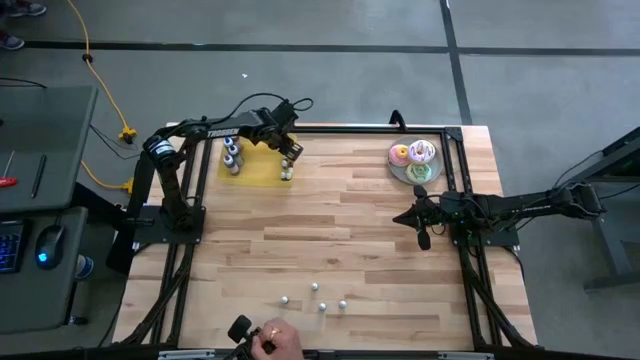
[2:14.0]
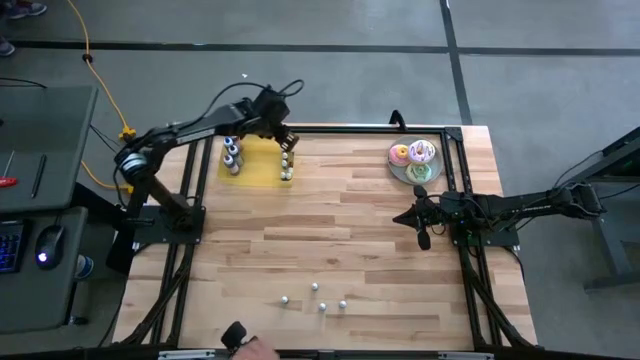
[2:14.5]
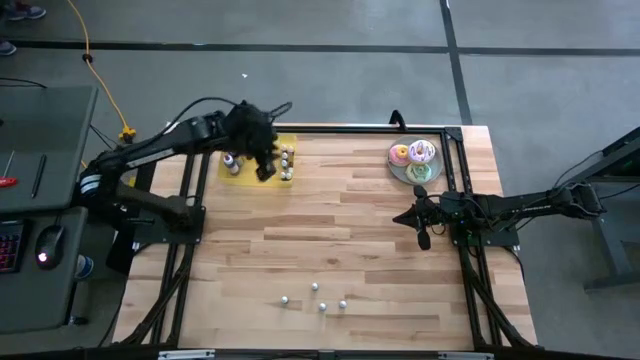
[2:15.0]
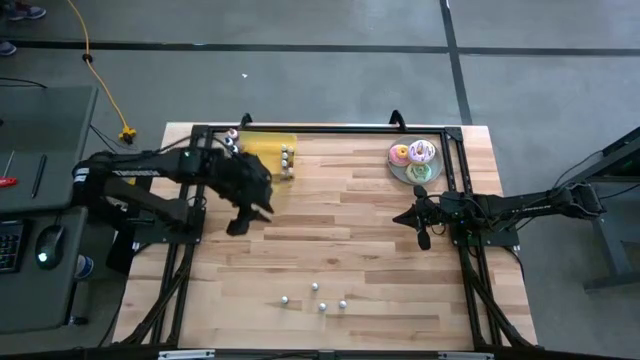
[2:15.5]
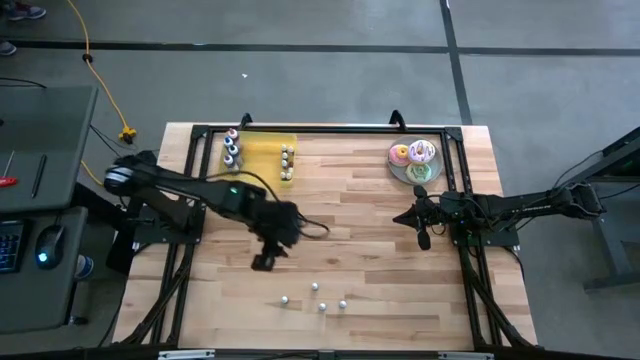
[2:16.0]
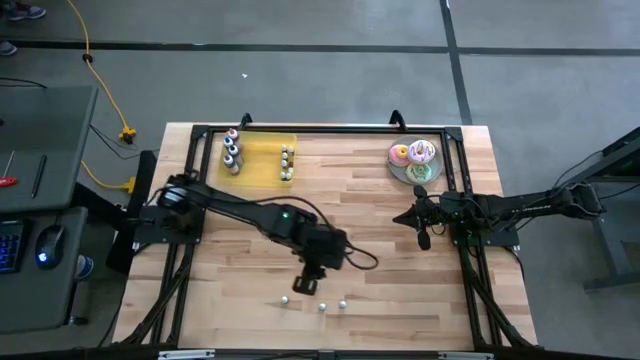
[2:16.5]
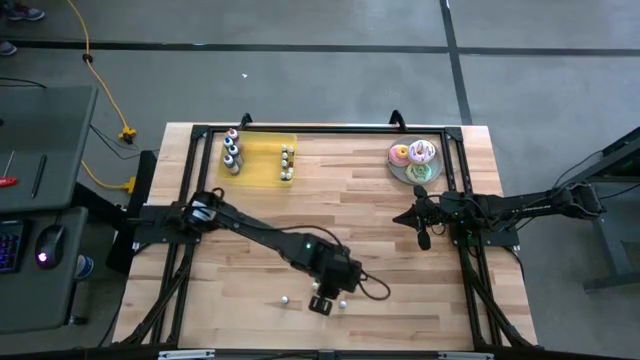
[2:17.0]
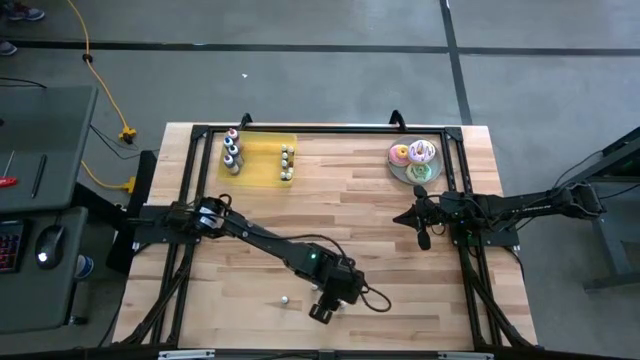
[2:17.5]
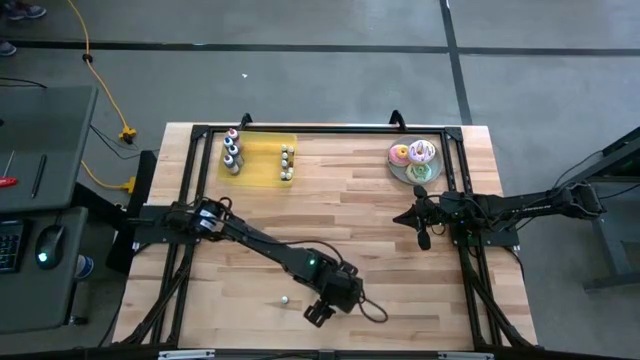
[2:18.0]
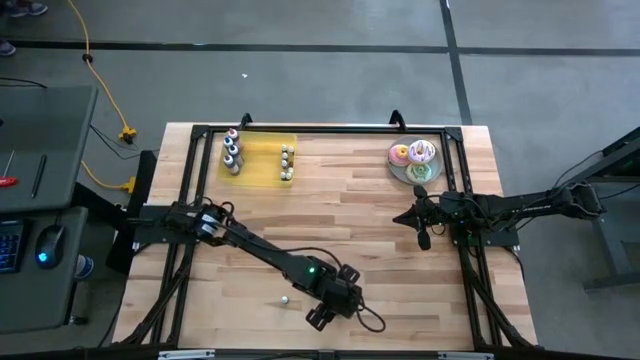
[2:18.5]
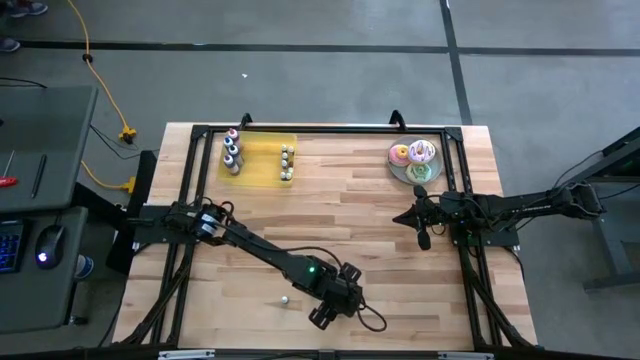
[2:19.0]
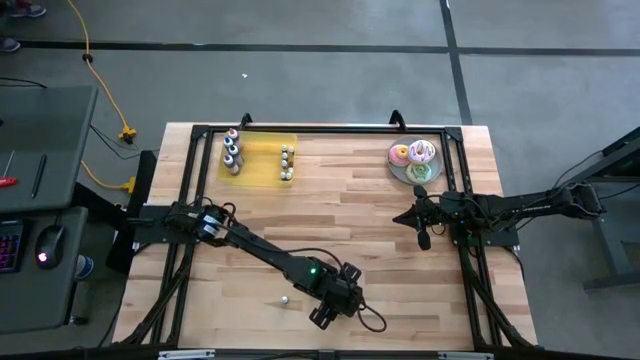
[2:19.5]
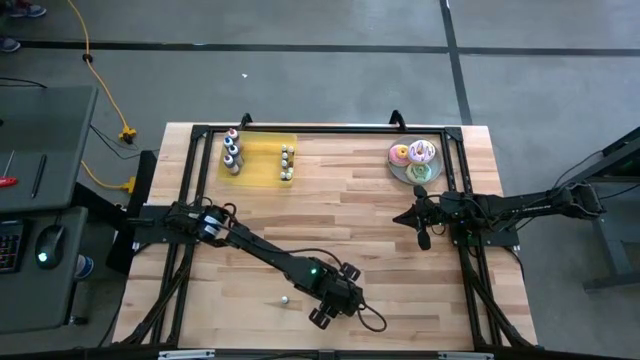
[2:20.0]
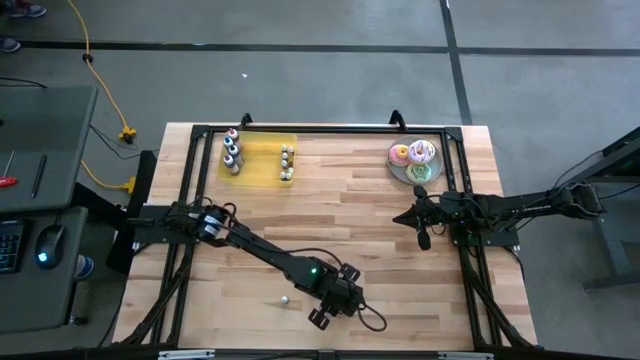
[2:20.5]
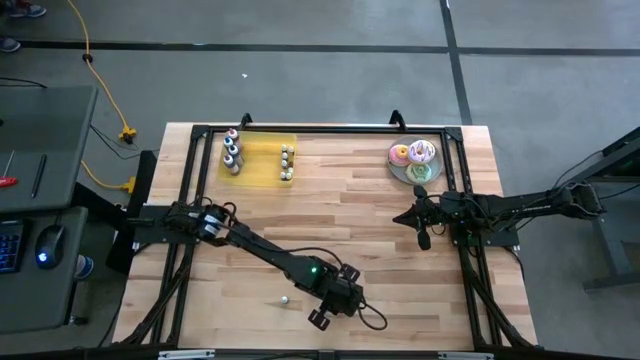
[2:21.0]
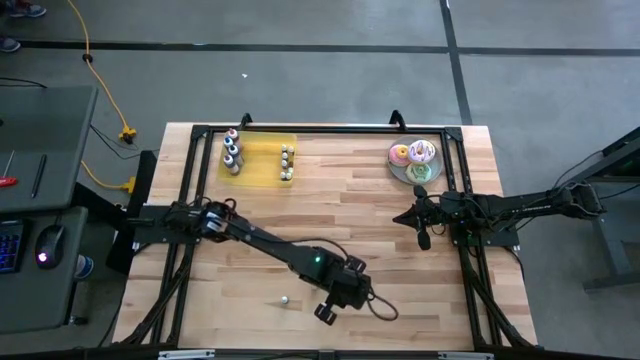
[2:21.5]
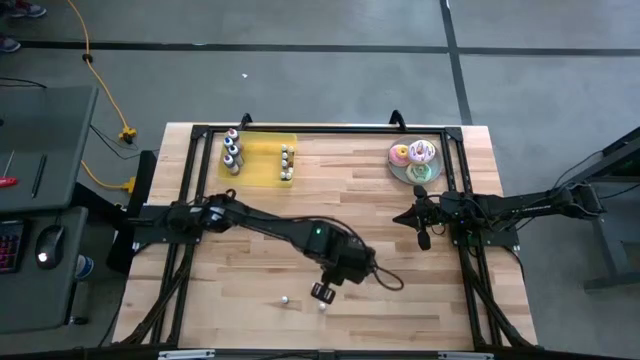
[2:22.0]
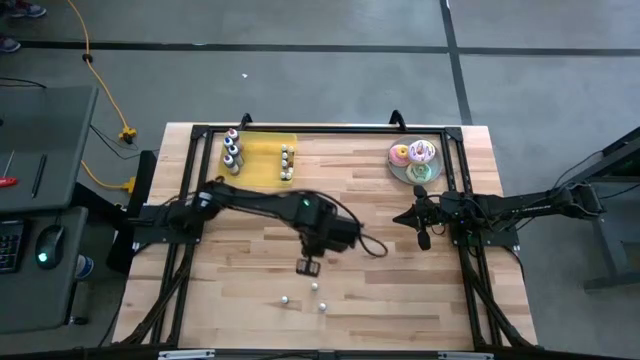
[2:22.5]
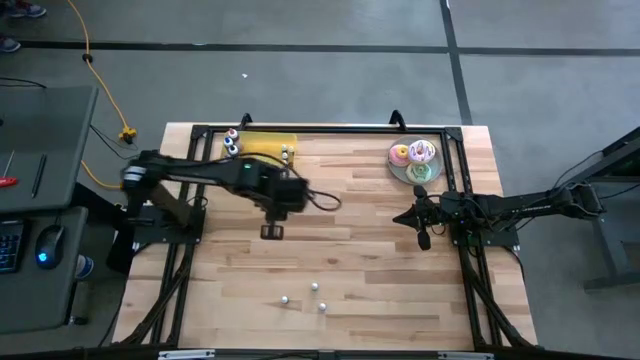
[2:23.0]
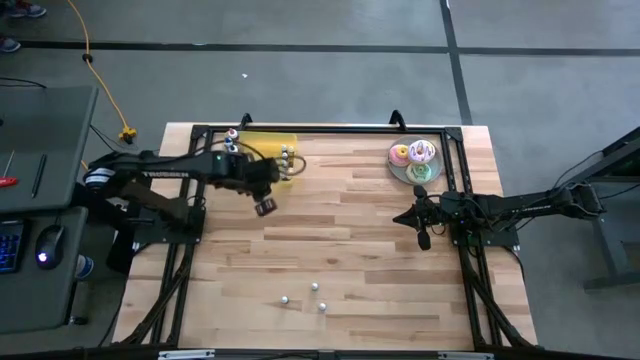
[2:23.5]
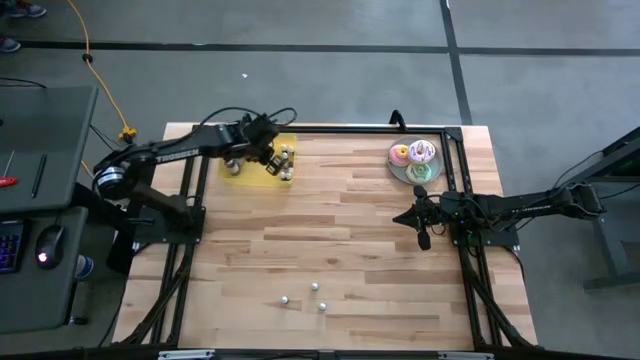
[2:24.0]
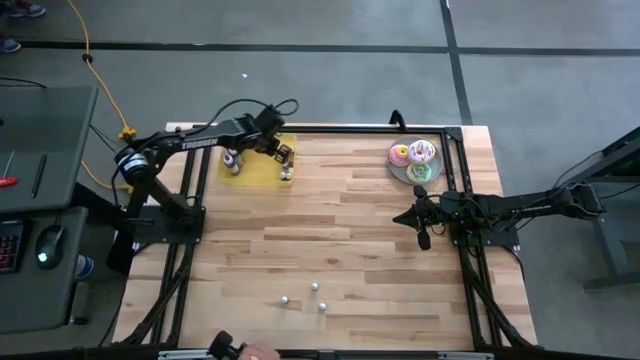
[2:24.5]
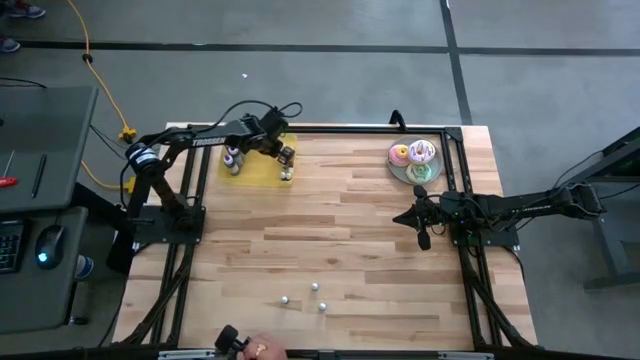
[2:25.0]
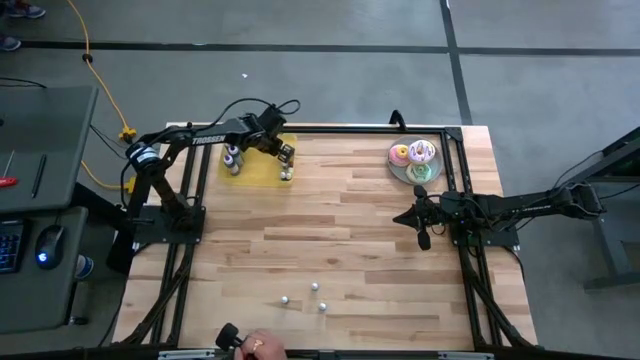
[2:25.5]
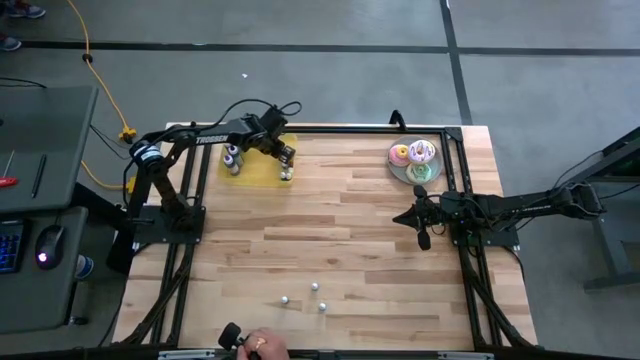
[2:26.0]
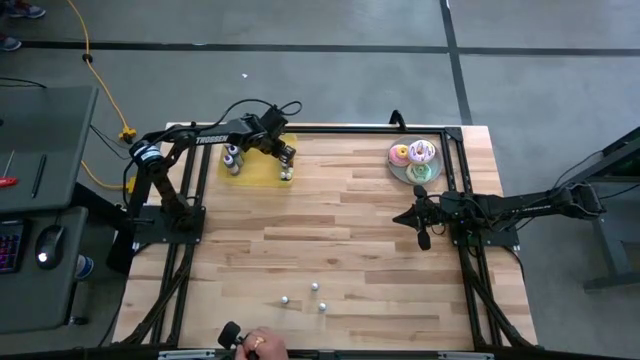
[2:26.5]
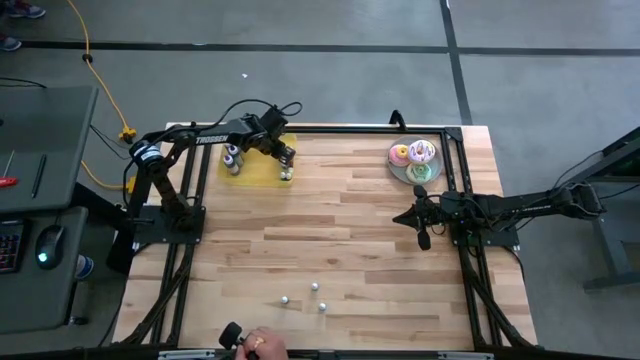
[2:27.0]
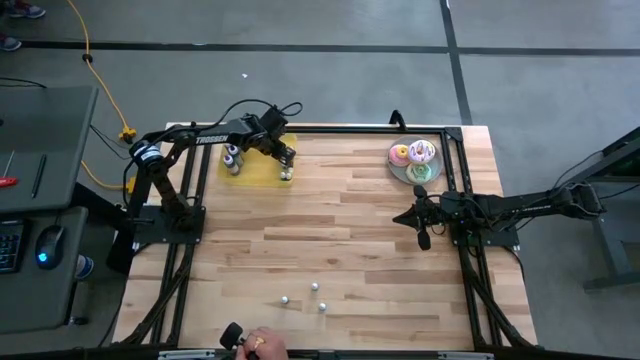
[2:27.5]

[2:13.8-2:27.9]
Task: Pick & Place food coloring
Put the small purple food coloring bottle into the yellow bin

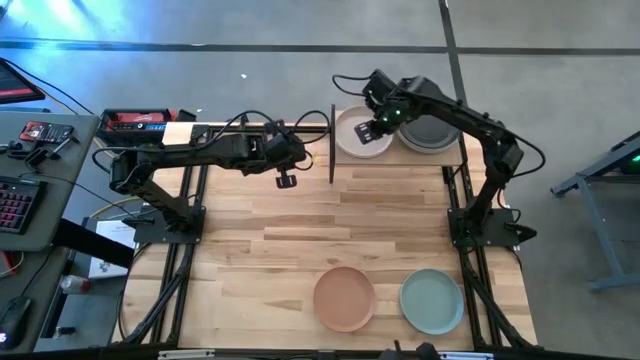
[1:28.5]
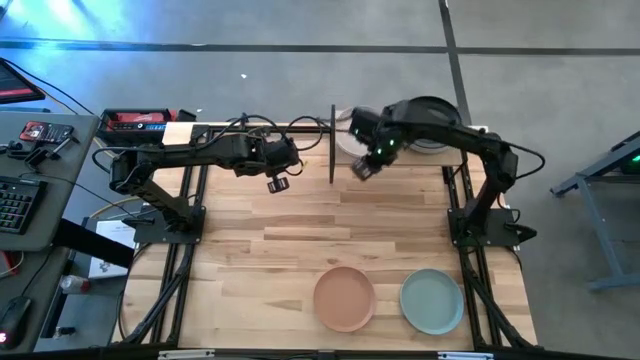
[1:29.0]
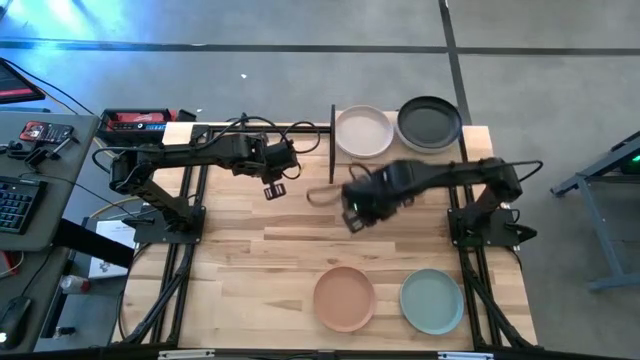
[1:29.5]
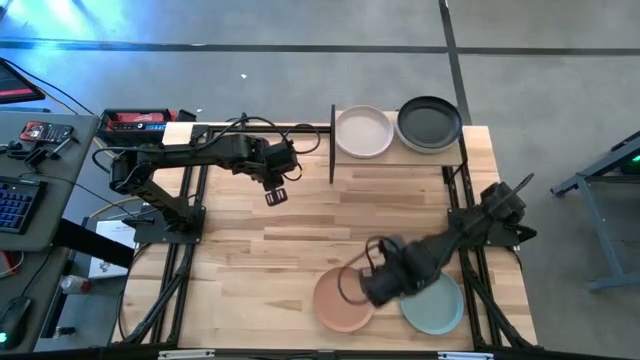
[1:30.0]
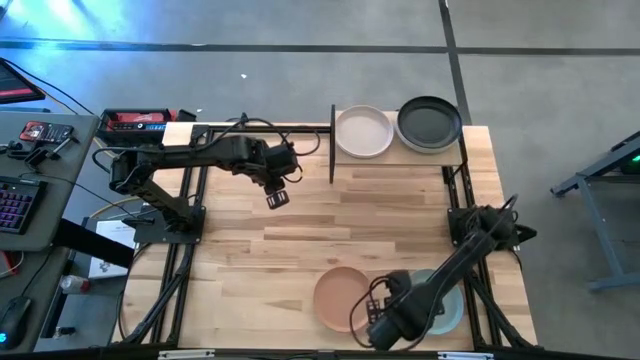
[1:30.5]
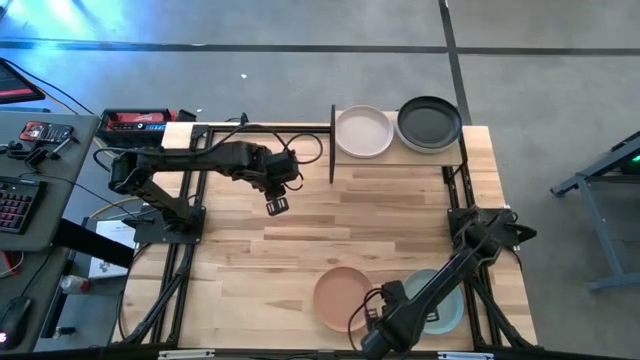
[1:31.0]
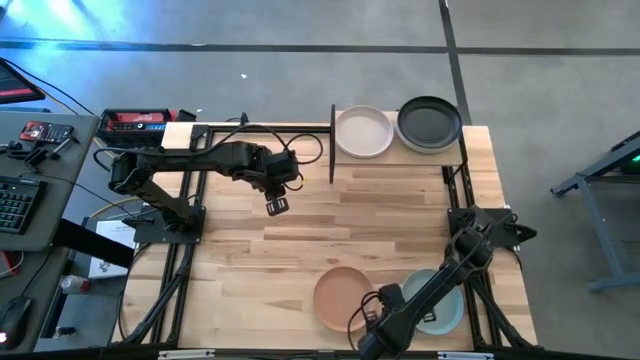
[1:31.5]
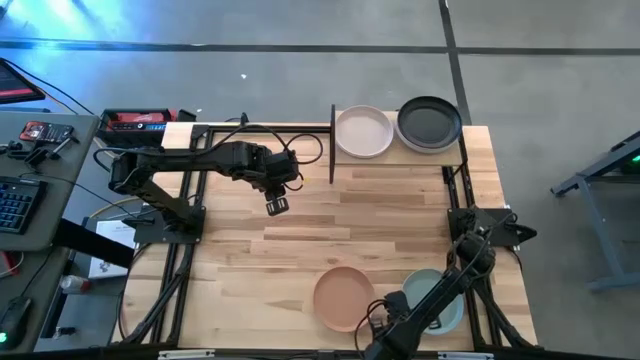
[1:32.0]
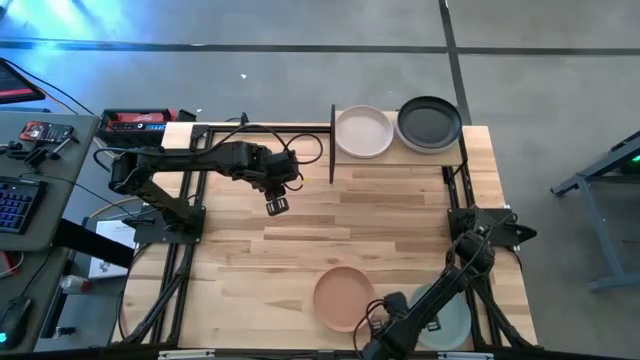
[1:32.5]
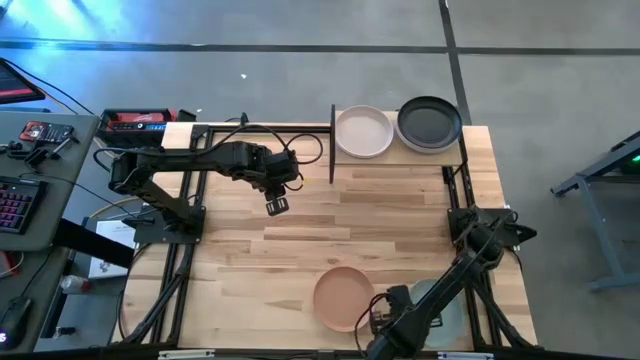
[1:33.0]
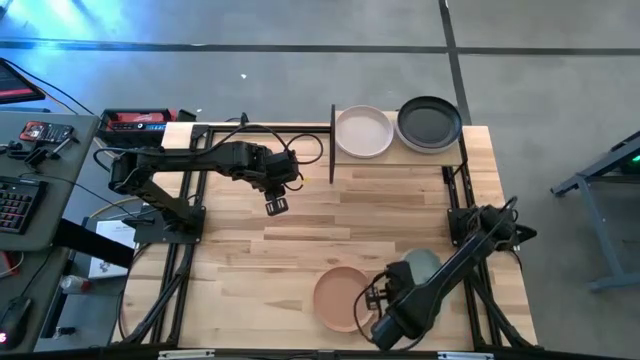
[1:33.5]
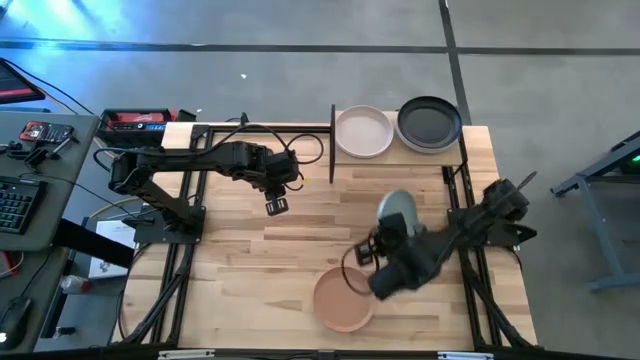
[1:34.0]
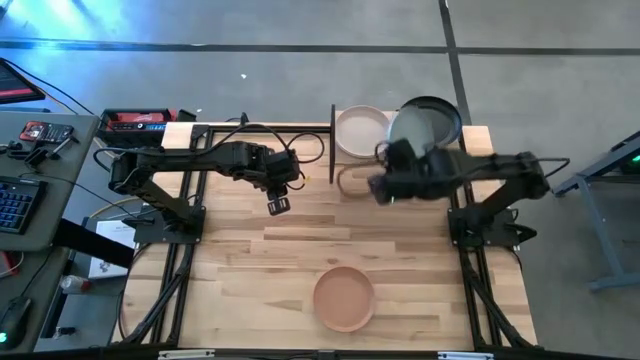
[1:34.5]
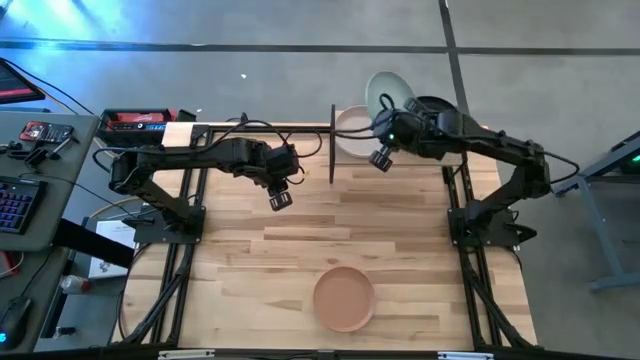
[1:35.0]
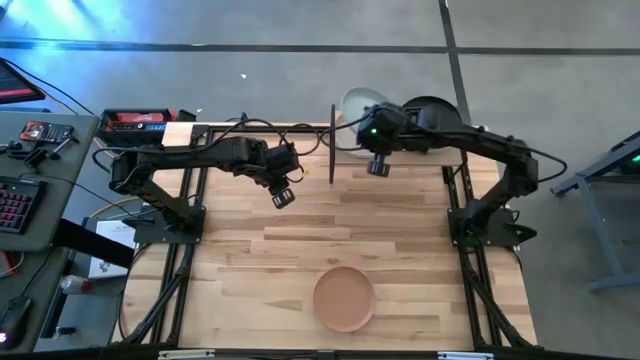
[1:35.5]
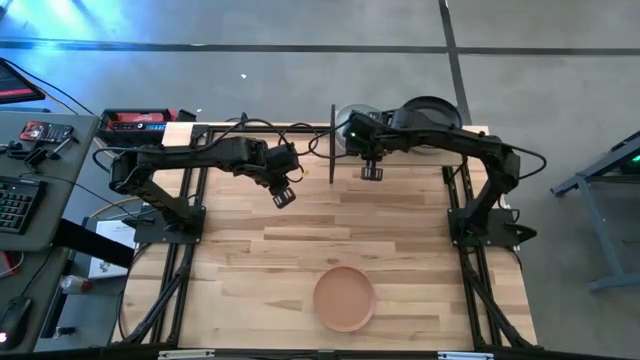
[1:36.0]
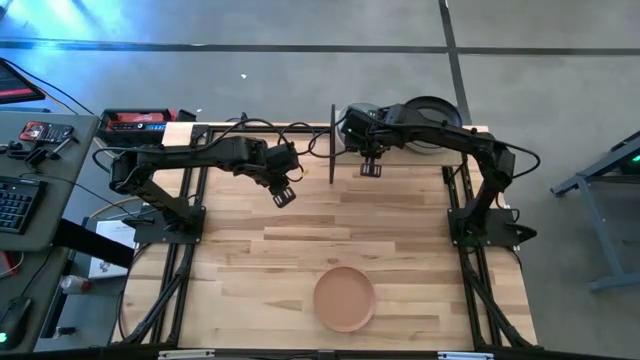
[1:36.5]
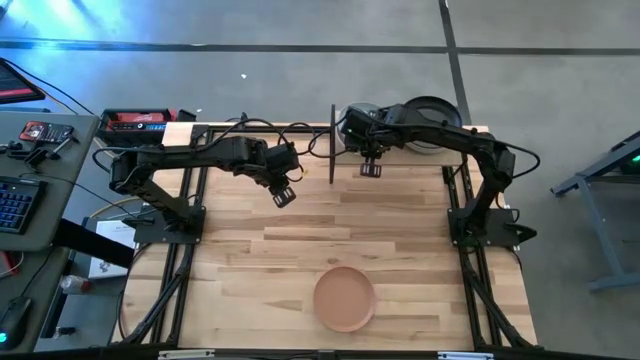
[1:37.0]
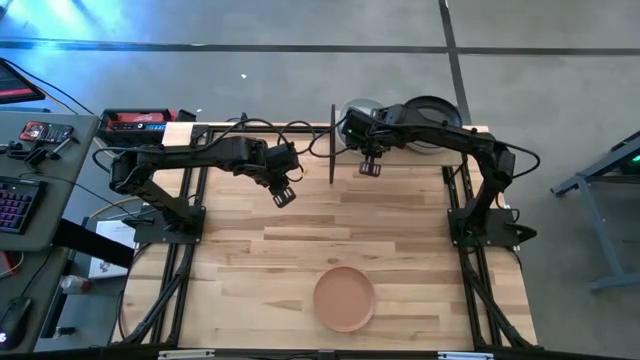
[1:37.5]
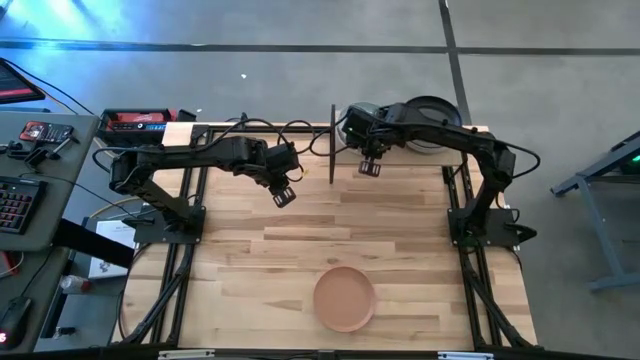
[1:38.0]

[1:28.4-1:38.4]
Task: Place and stack plates onto a shelf
Stack the blue plate on top of the gray plate on the shelf
